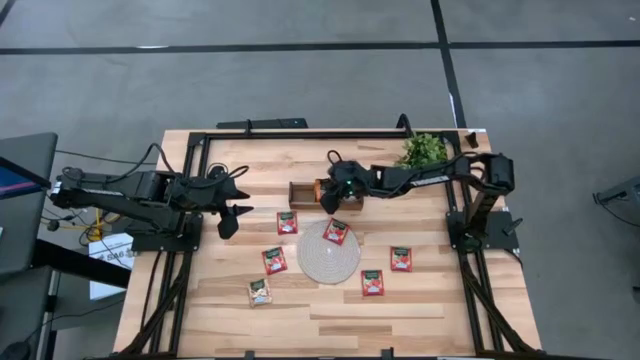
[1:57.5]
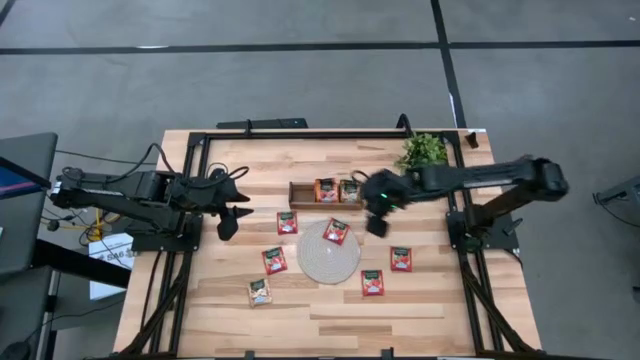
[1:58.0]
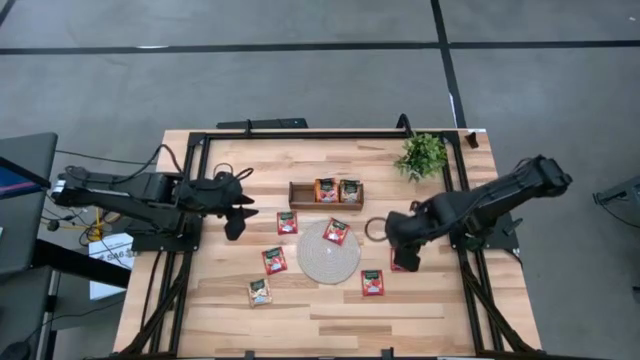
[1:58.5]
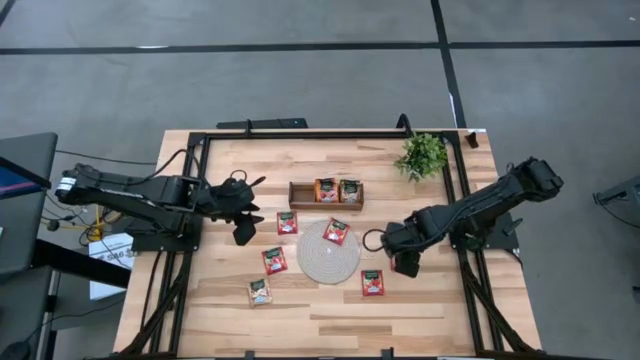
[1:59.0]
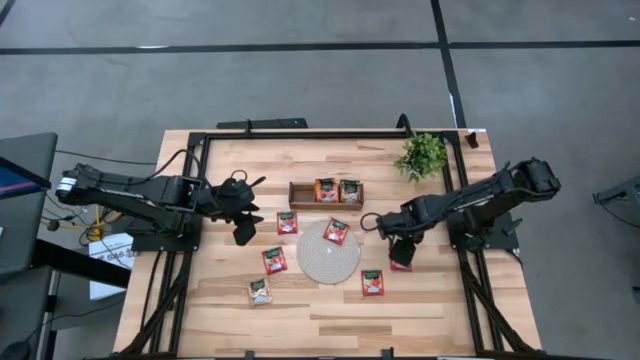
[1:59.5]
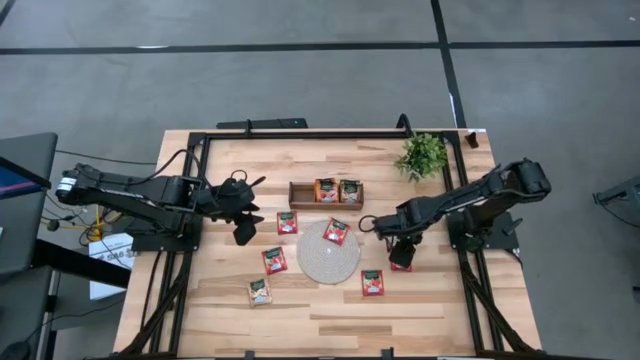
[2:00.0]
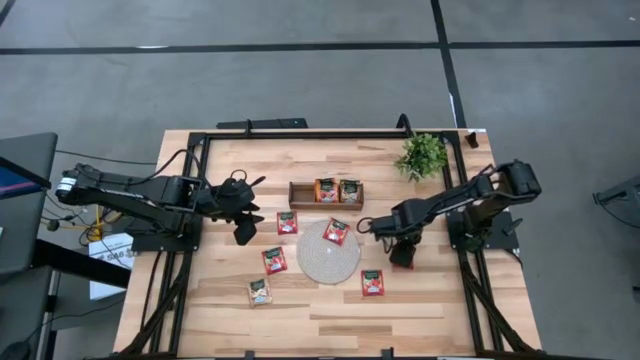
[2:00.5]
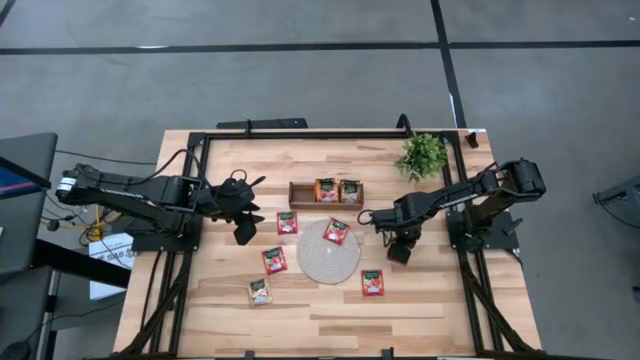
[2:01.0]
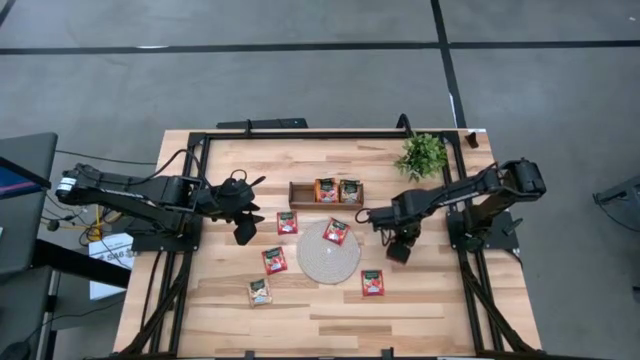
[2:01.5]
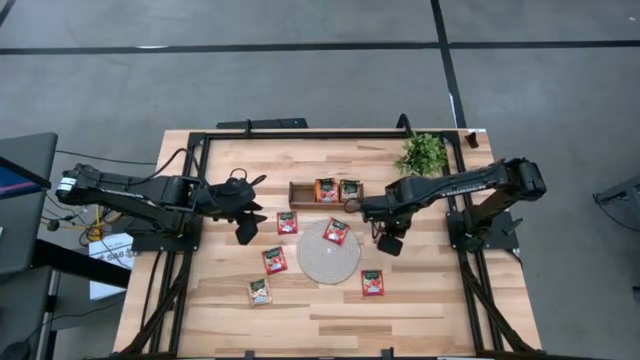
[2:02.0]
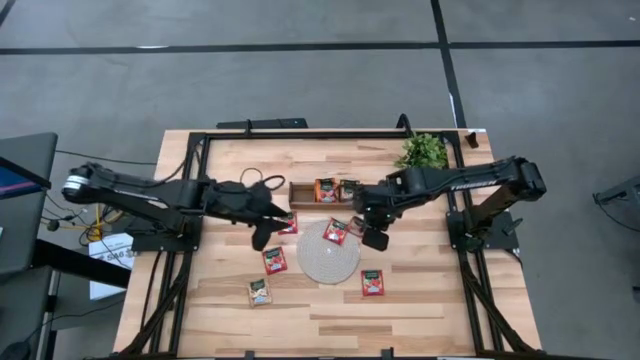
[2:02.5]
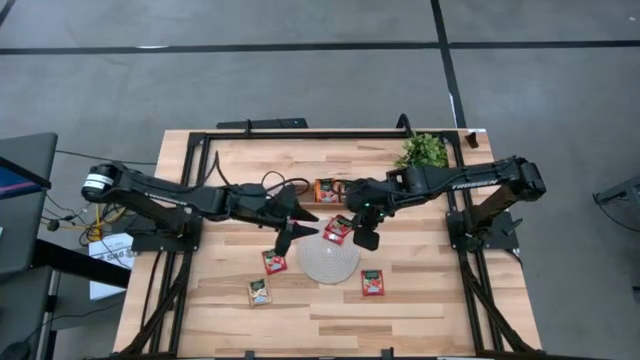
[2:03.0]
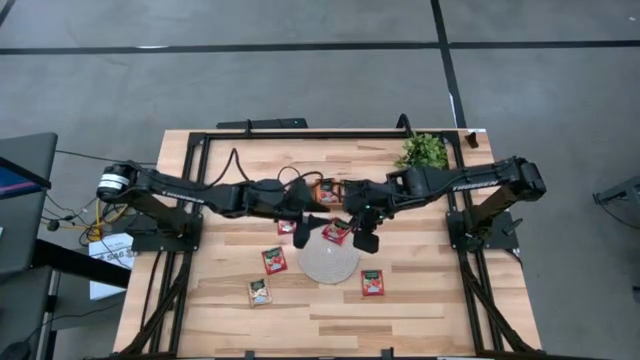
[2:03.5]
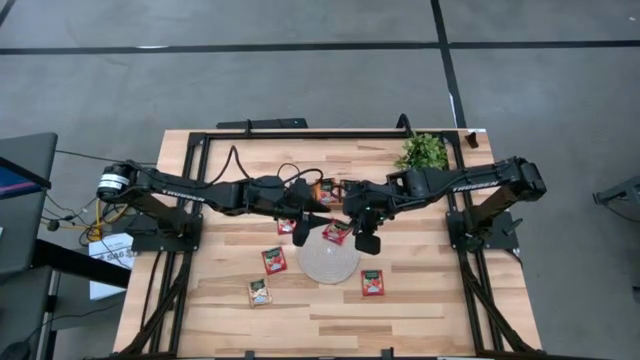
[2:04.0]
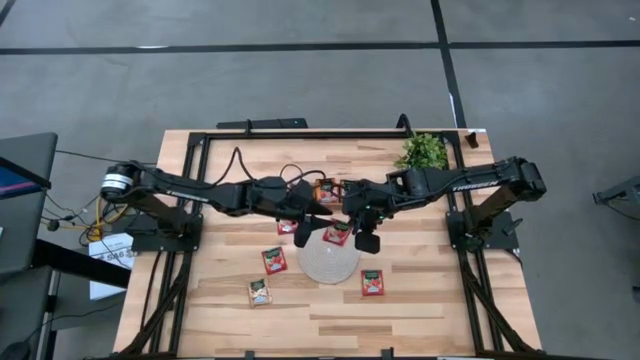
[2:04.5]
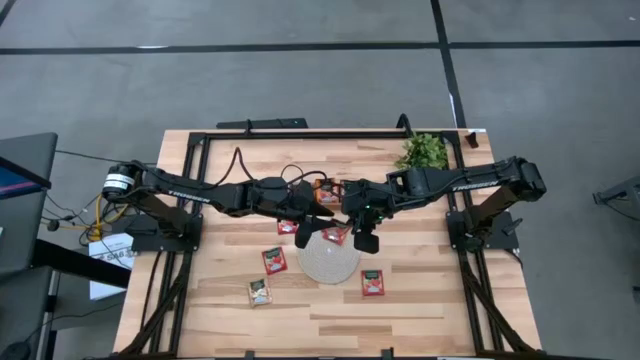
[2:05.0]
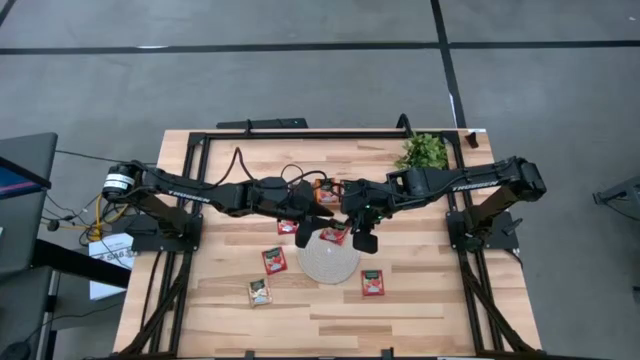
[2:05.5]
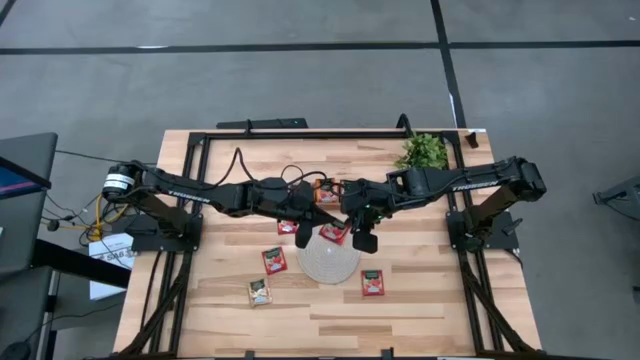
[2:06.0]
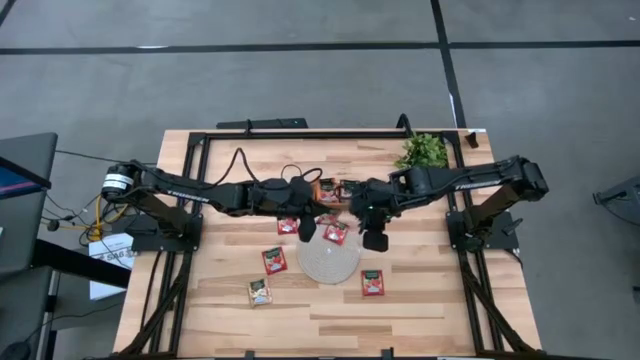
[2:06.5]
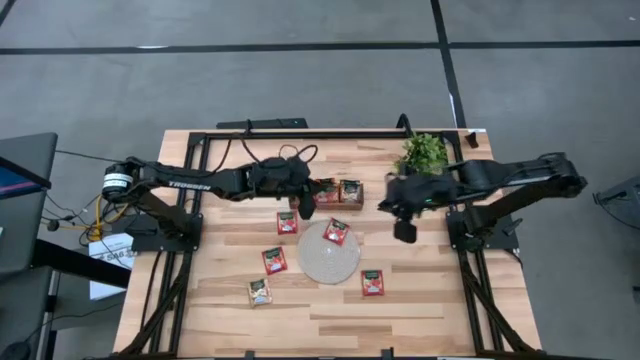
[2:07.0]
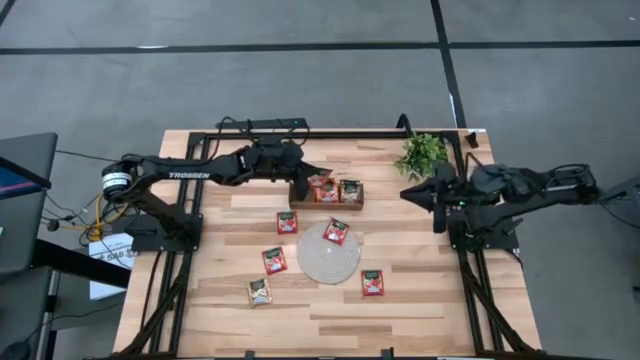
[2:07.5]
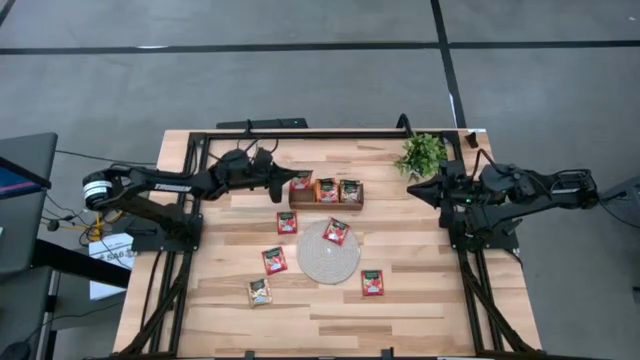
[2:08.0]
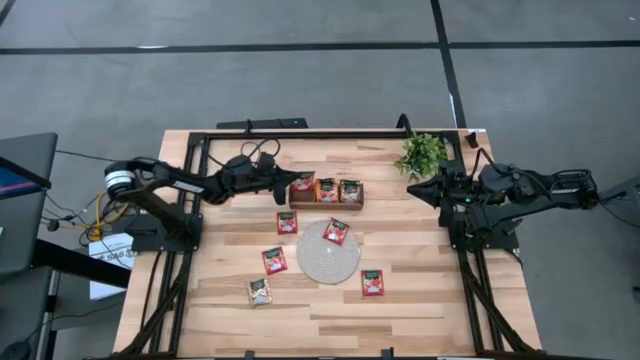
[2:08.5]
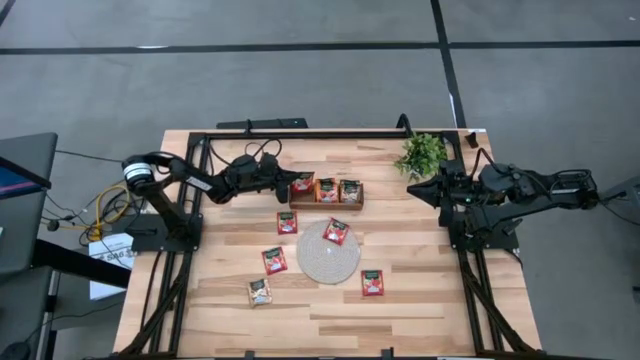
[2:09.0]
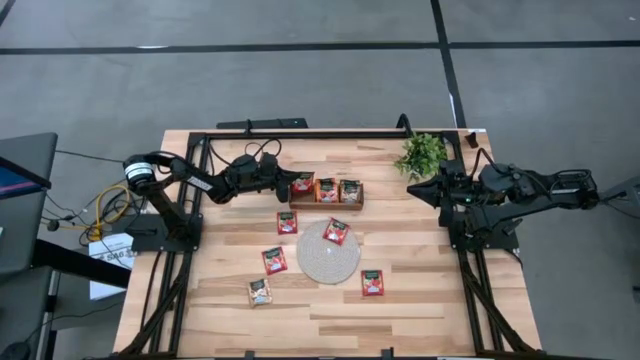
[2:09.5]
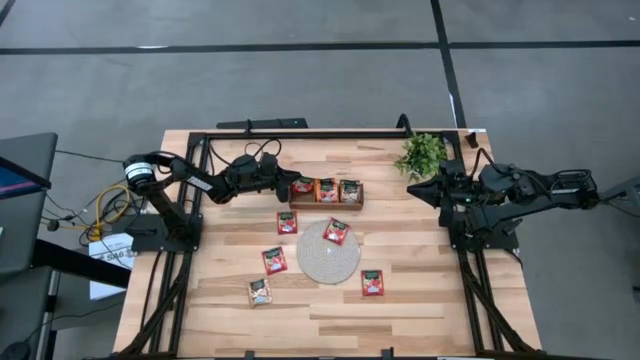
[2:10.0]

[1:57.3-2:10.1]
Task: Pick & Place Tea
Put the red tea bag into the left section of the wooden organizer

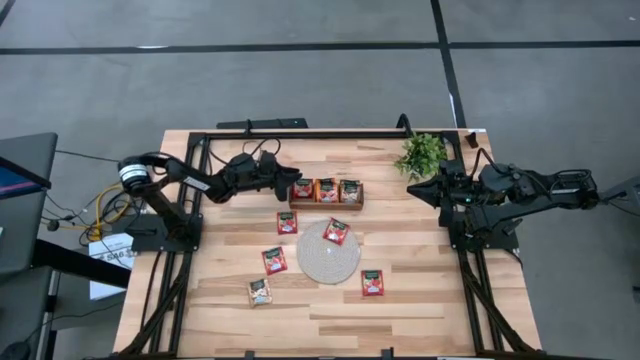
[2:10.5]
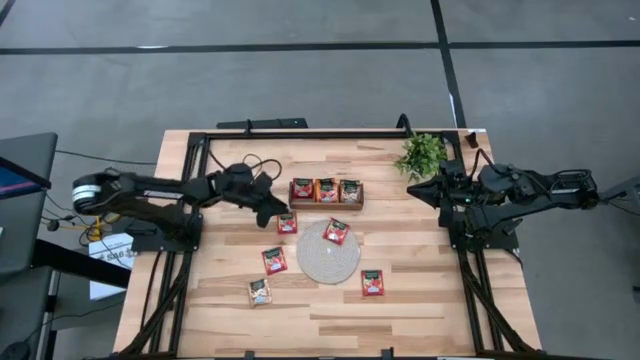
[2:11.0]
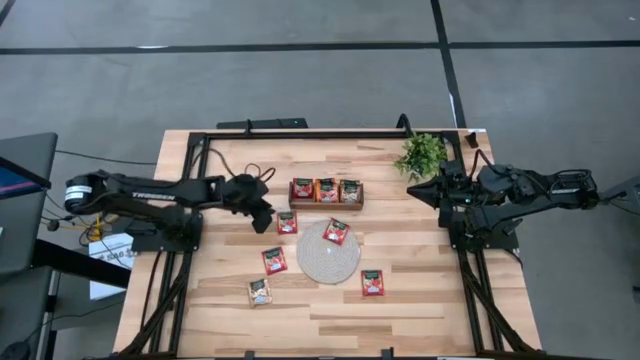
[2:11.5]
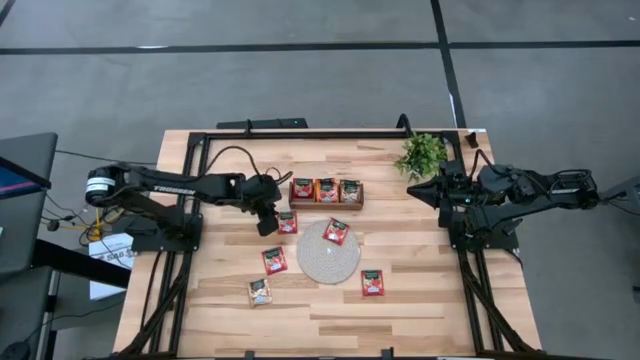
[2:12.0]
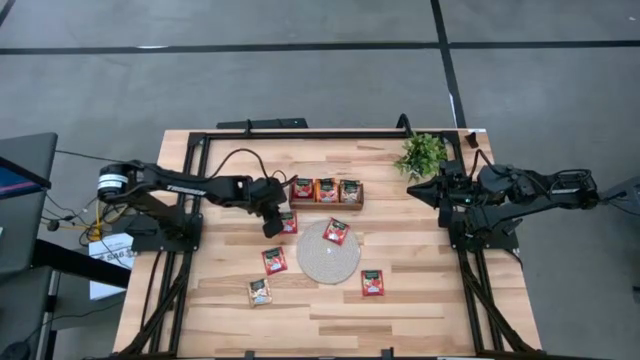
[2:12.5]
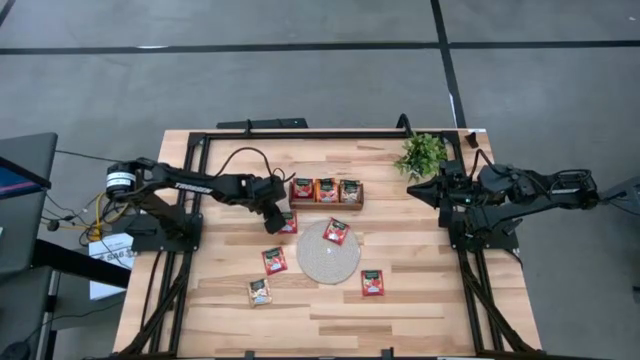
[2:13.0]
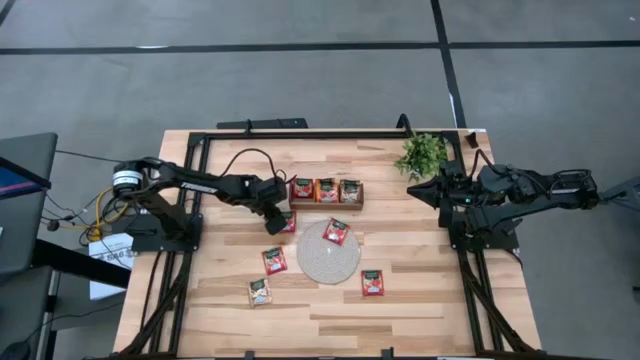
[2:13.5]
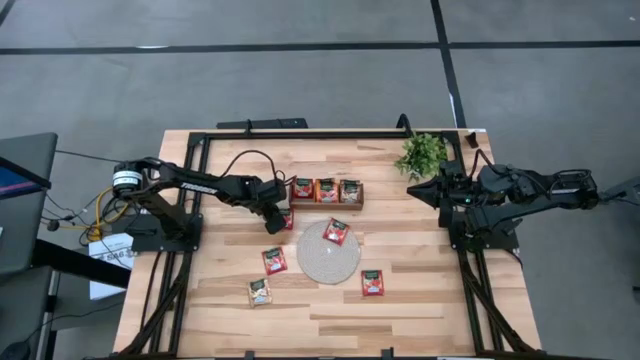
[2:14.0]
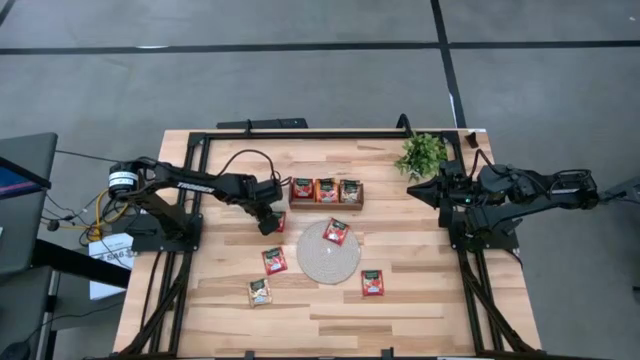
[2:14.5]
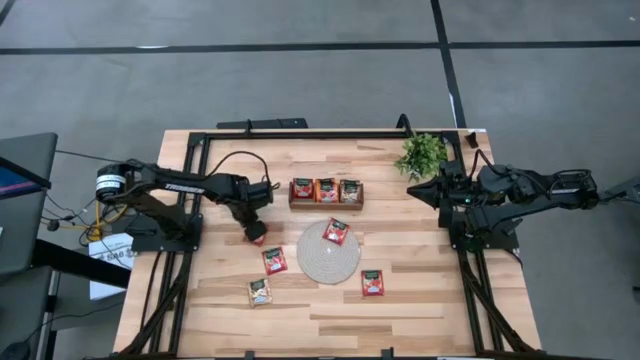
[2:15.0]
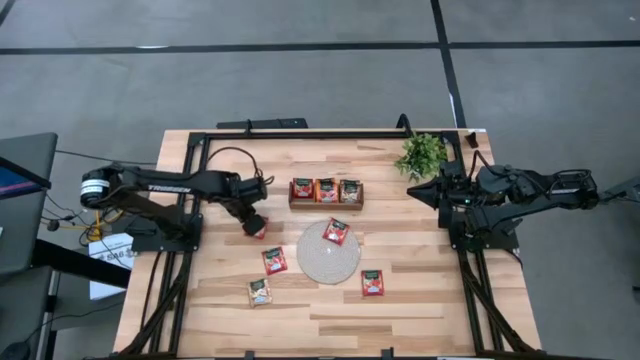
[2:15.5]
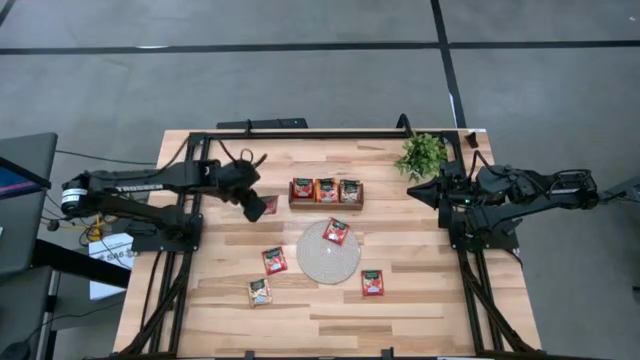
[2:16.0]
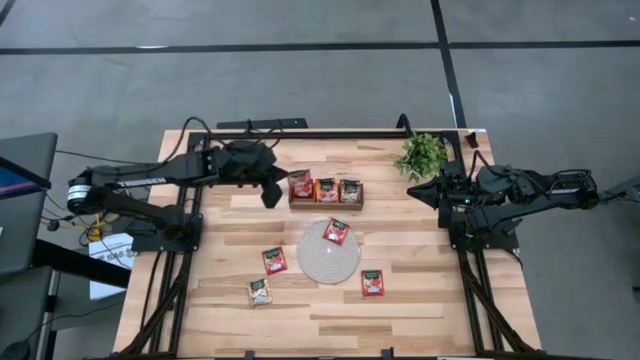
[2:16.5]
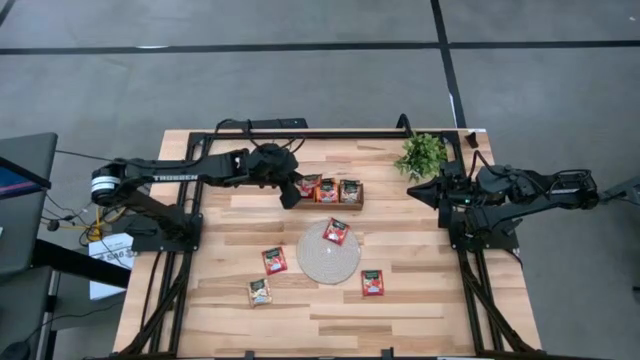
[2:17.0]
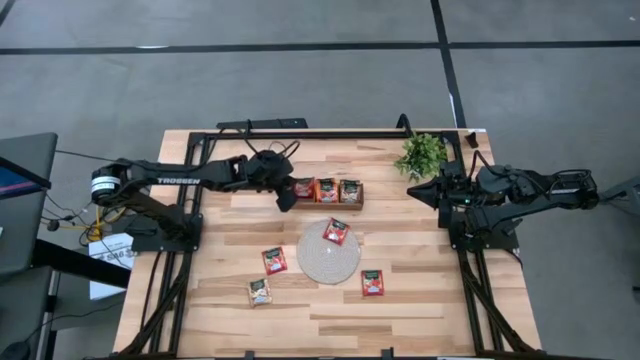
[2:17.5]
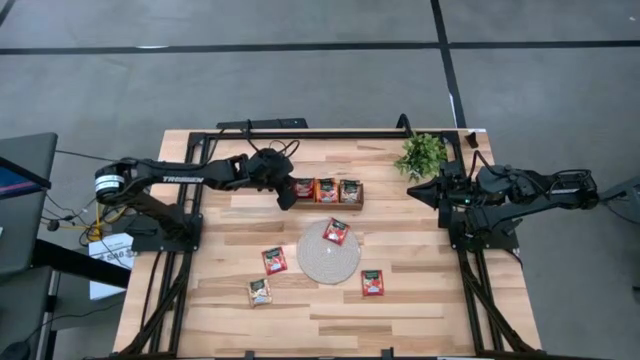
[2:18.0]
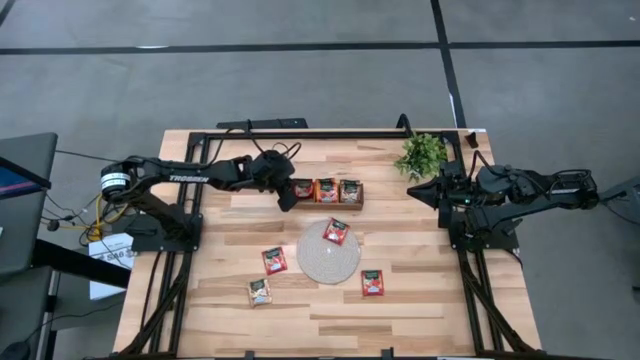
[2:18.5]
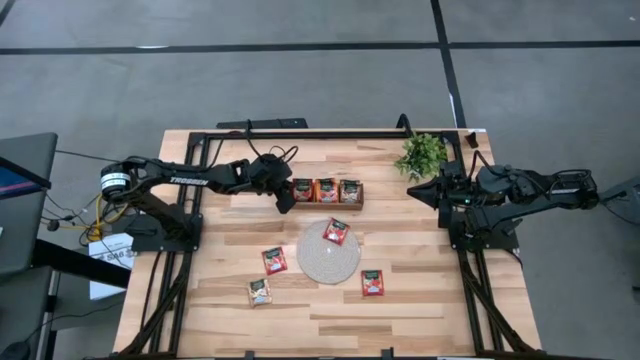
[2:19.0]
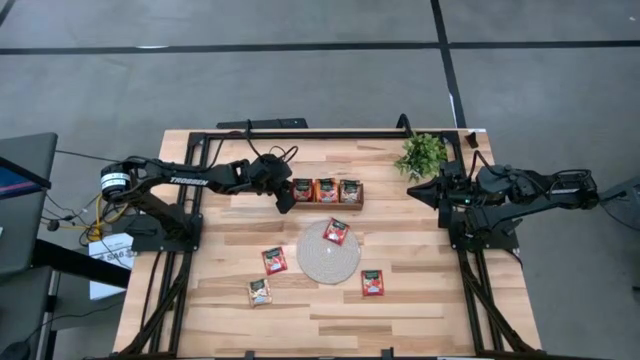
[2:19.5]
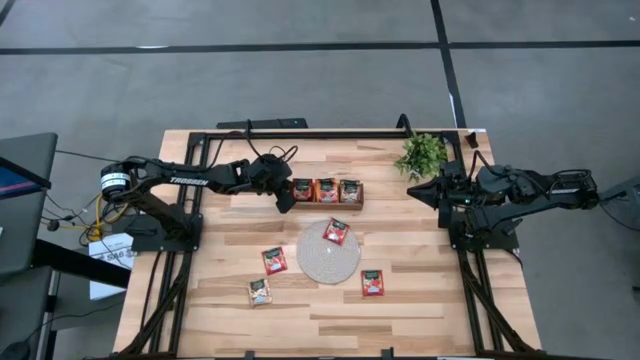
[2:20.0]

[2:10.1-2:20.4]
Put the red tea bag into the left section of the wooden organizer
